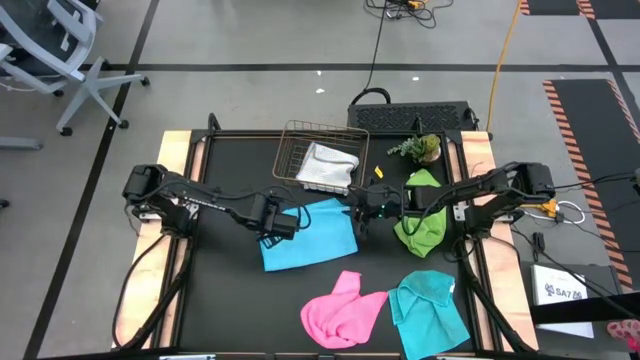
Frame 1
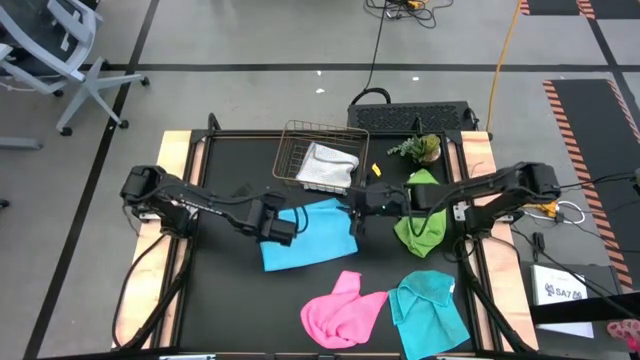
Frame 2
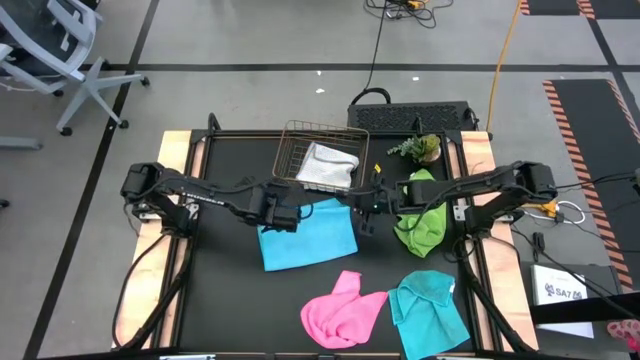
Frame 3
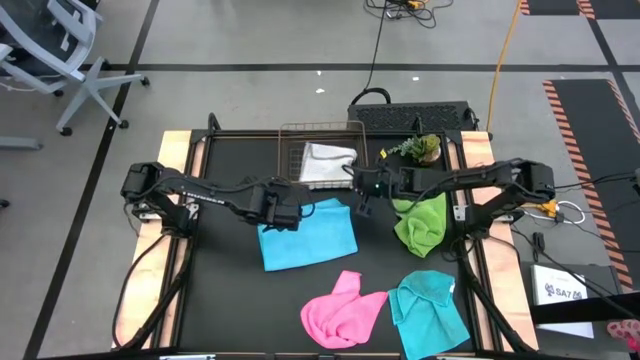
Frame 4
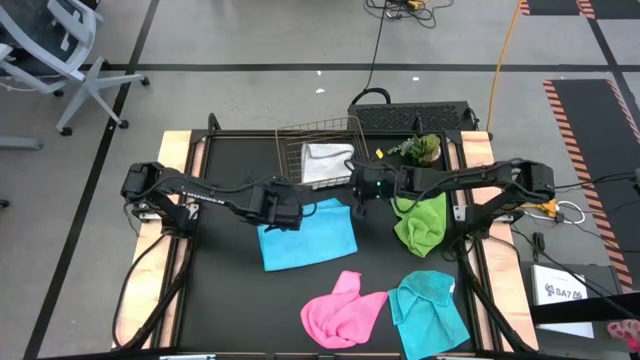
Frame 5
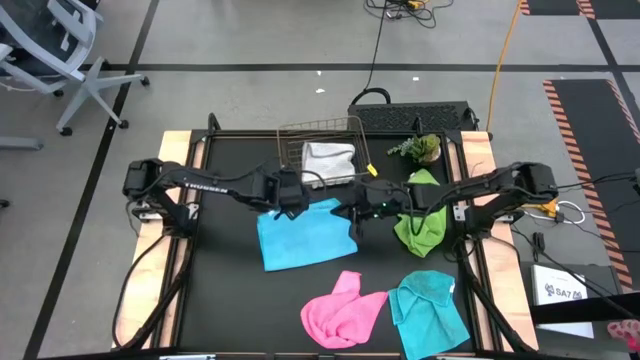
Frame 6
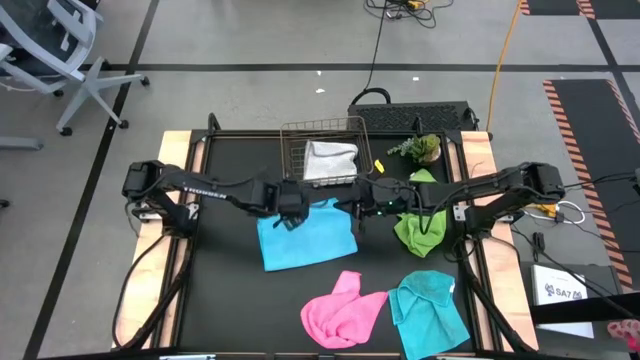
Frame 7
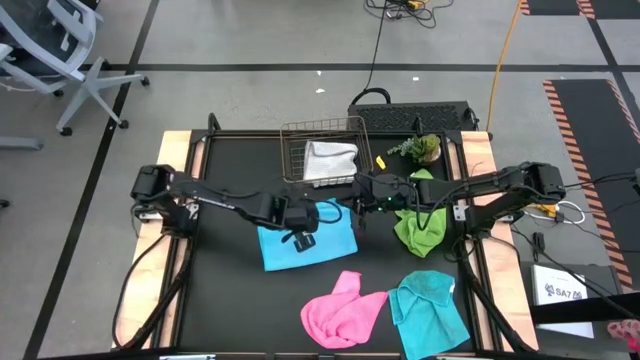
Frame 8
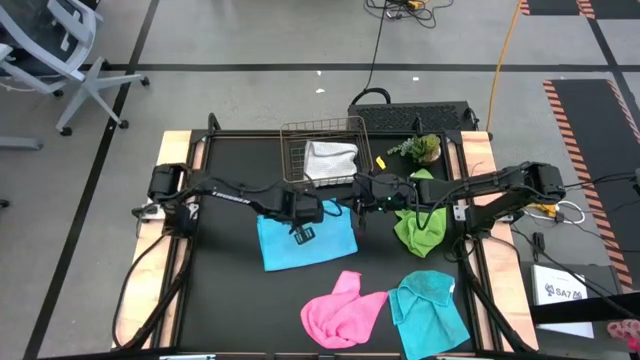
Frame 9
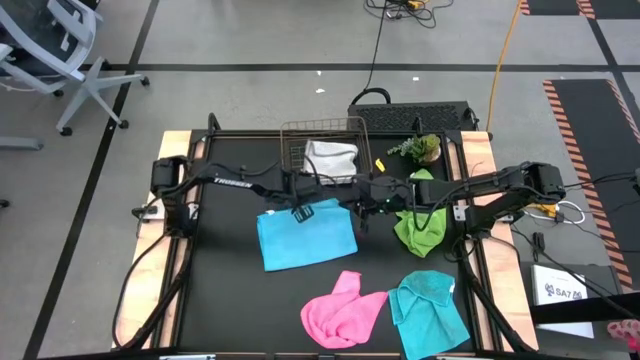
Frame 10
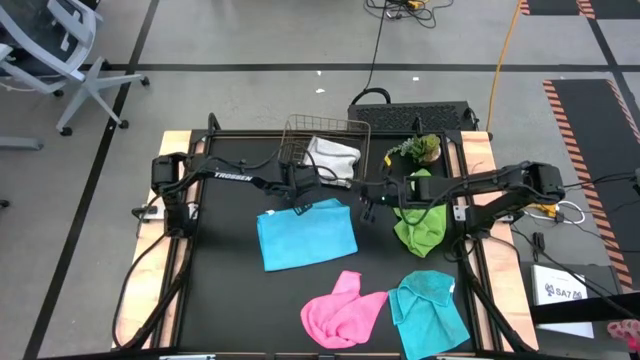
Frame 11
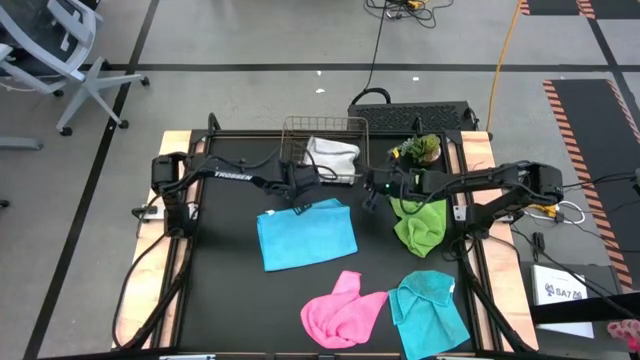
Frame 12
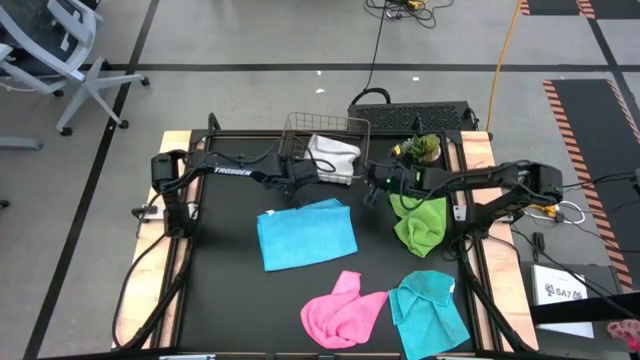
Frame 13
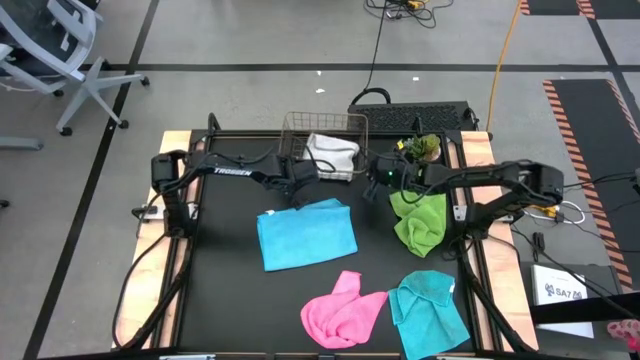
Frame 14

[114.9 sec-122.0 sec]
Task: Fold microfiber towels
Adjust the wire basket

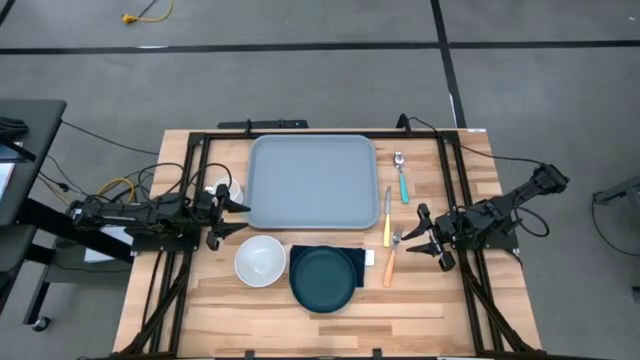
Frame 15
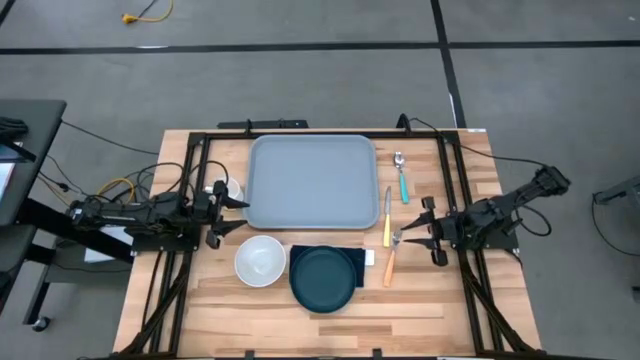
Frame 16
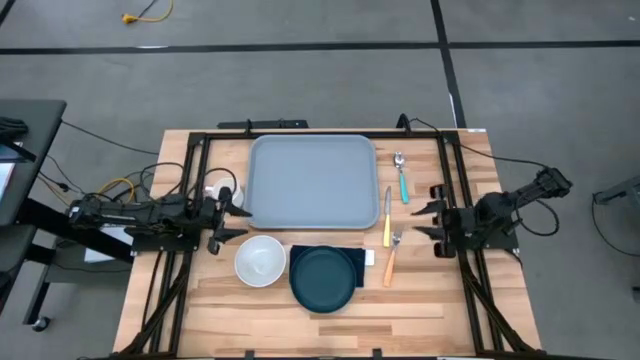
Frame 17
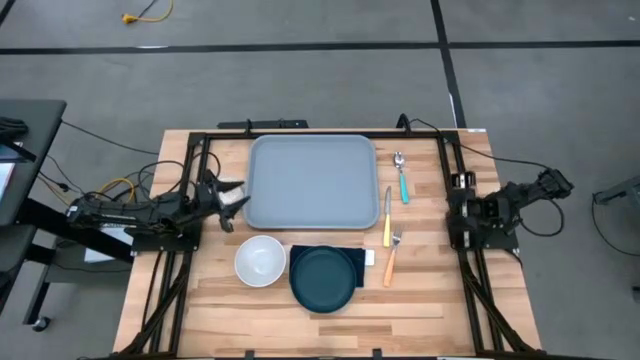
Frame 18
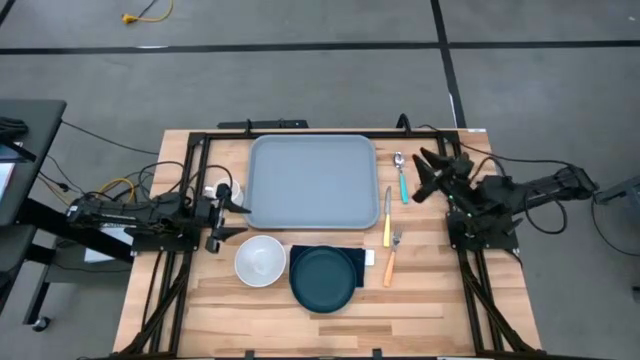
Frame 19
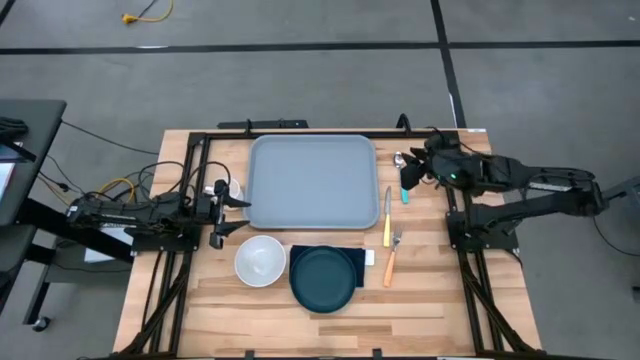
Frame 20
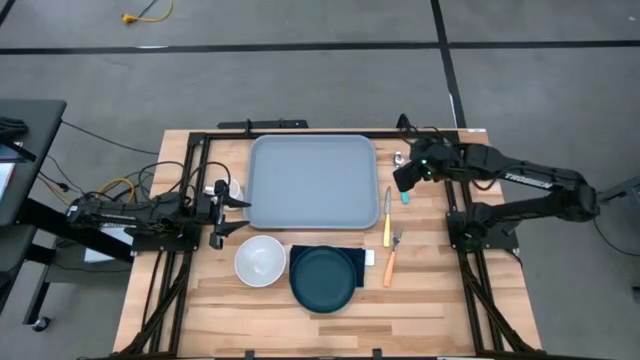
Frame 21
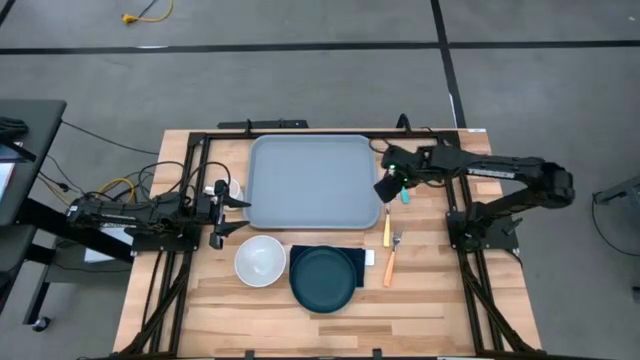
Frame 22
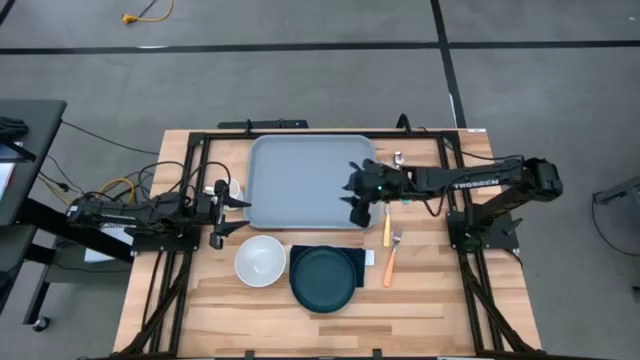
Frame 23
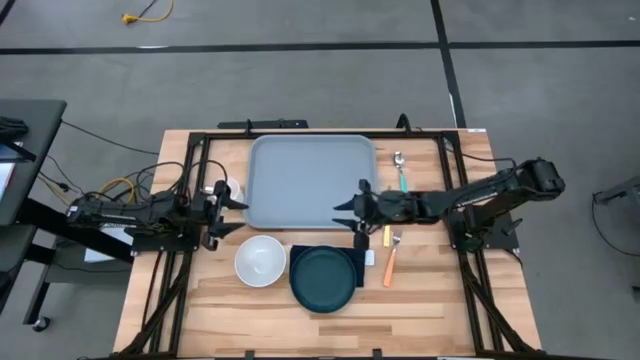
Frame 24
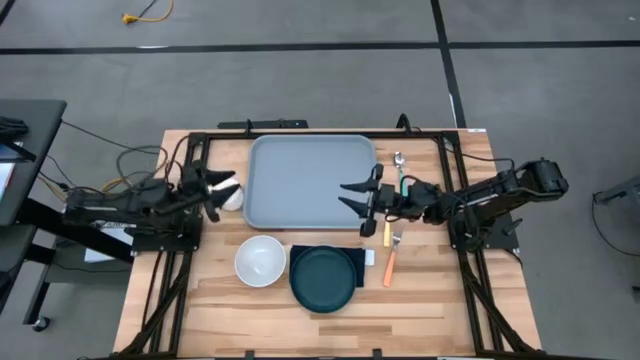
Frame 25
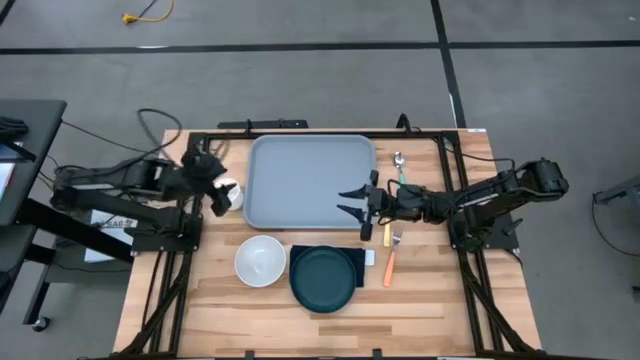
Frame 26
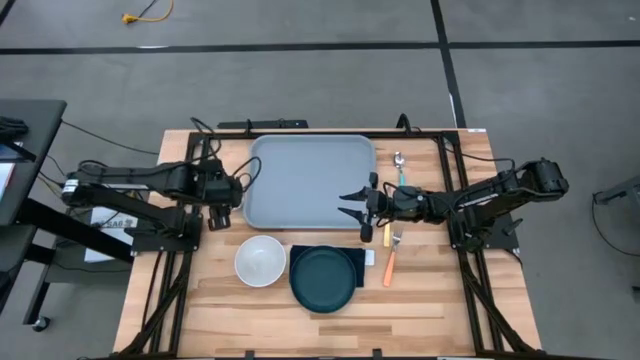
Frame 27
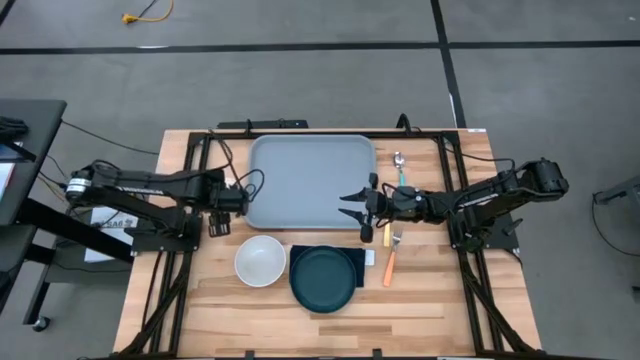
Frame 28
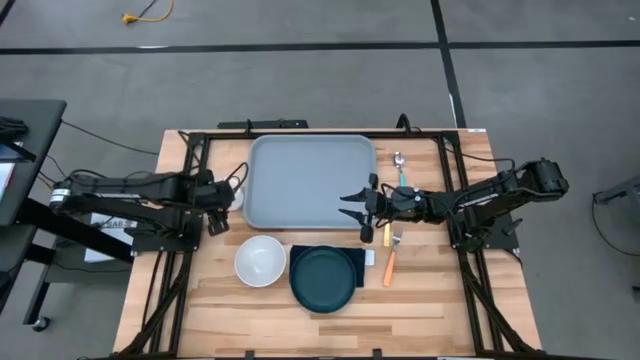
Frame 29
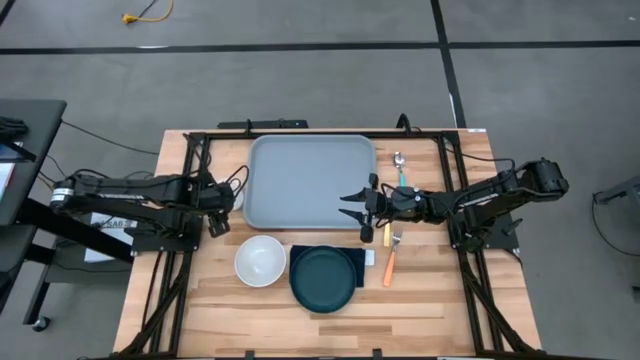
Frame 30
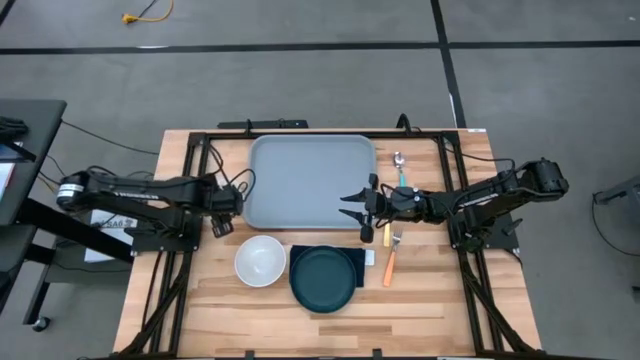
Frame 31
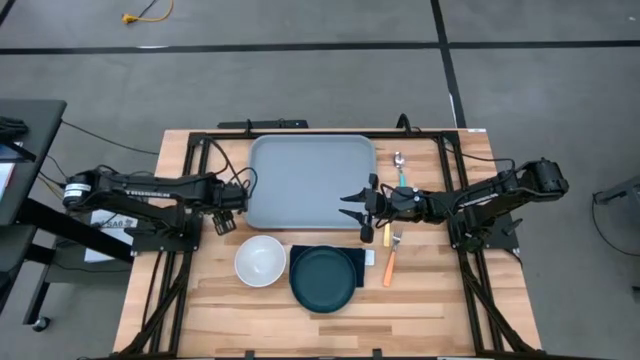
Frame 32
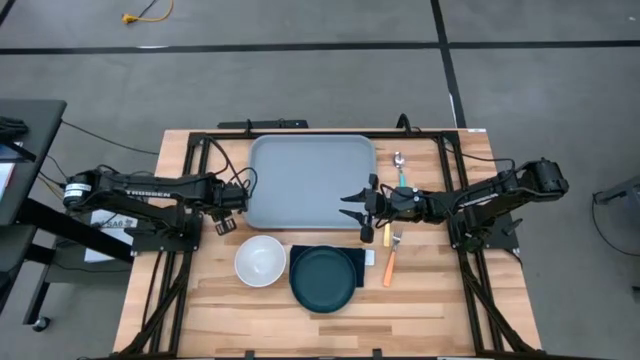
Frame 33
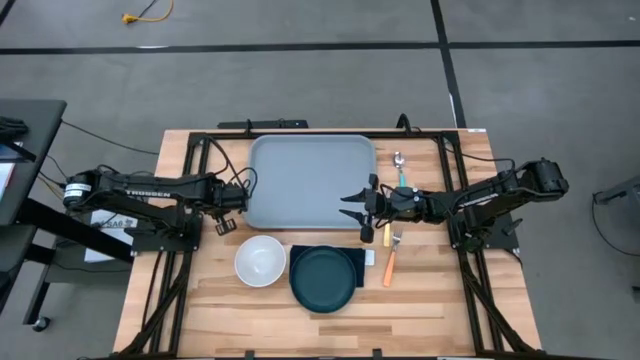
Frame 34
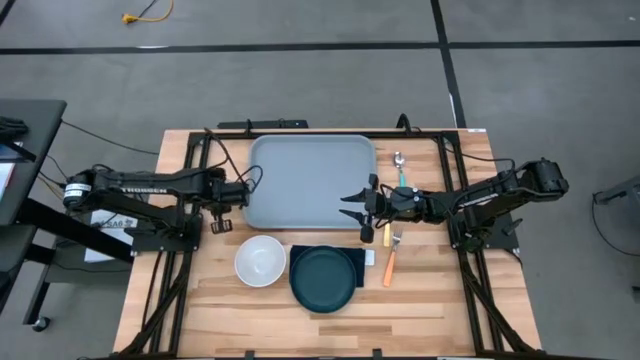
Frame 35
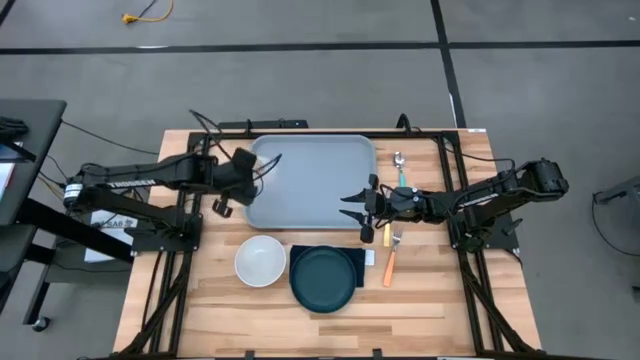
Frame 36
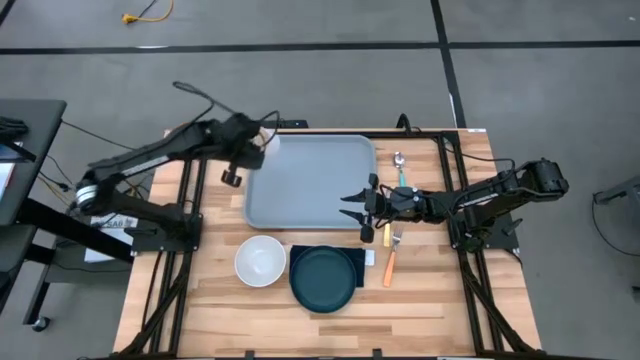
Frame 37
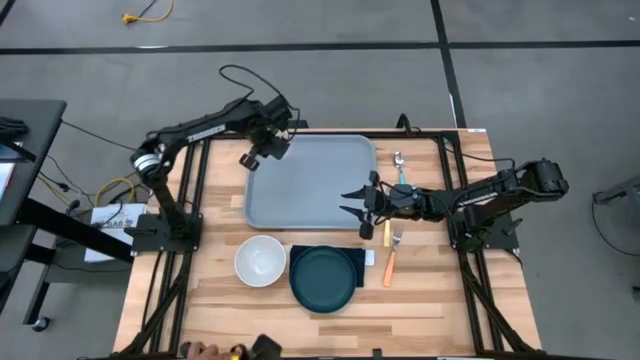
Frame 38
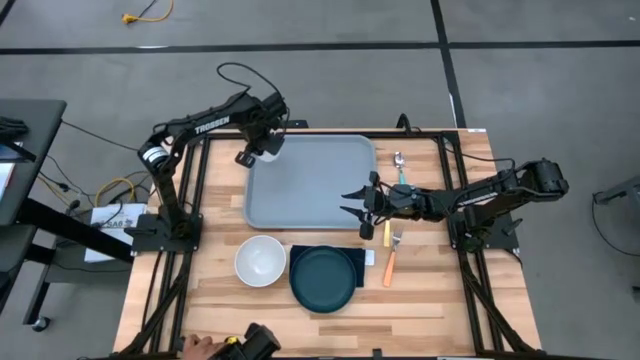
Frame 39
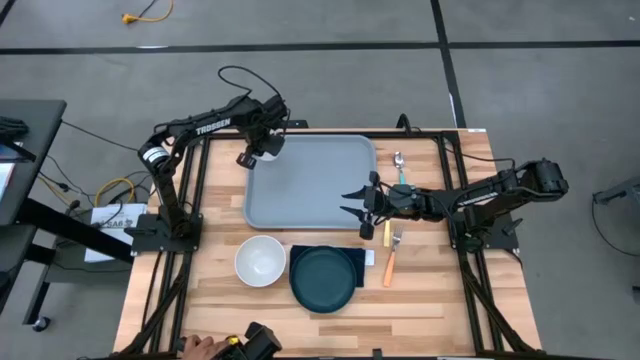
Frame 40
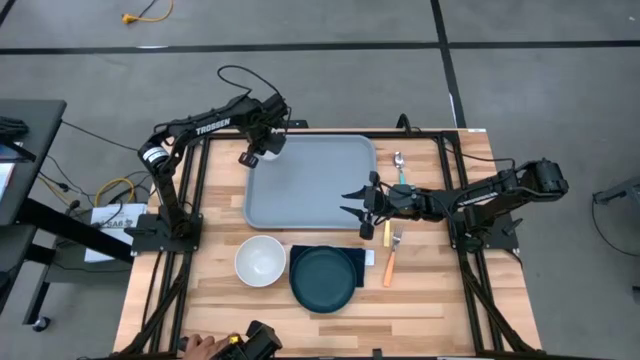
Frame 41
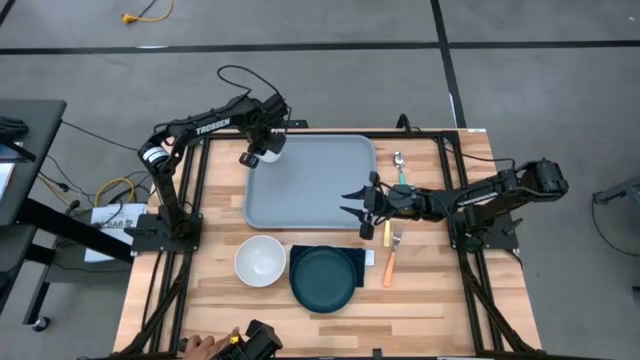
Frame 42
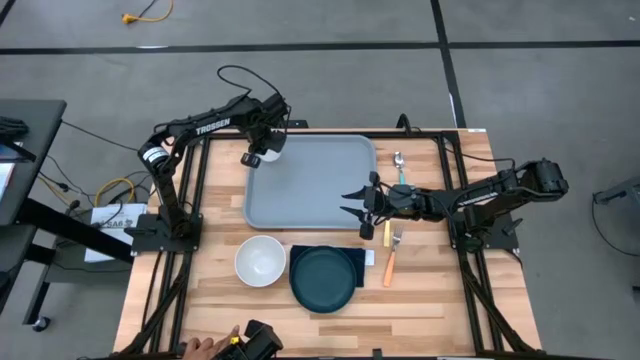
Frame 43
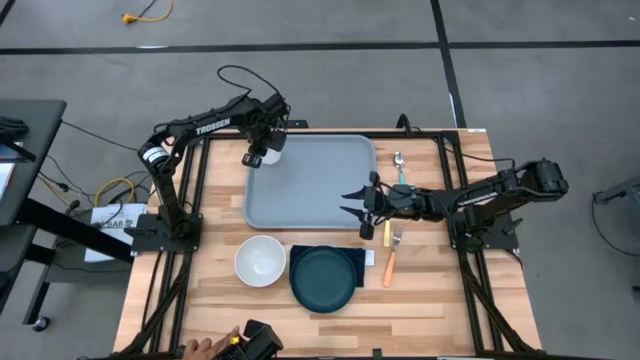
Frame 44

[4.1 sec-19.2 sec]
Task: Set up tray
Put the white mug on the top left of the gray tray
